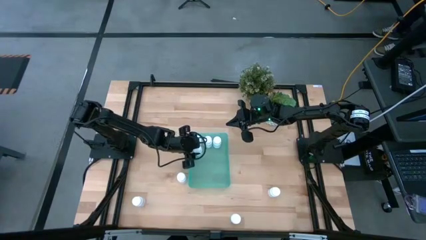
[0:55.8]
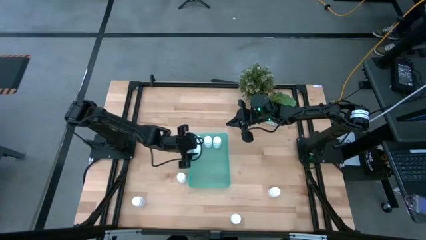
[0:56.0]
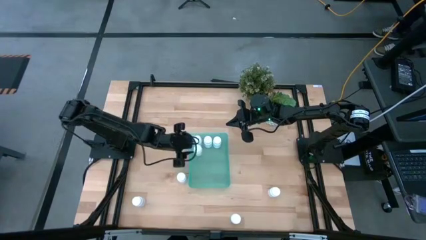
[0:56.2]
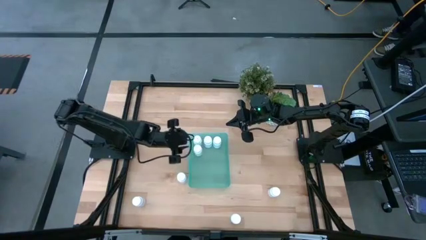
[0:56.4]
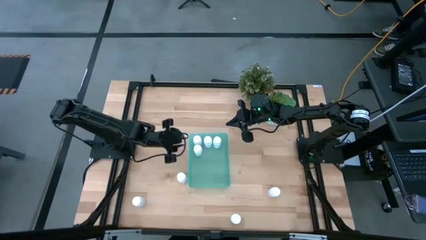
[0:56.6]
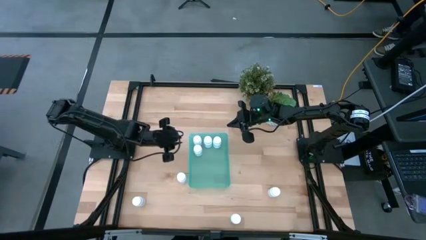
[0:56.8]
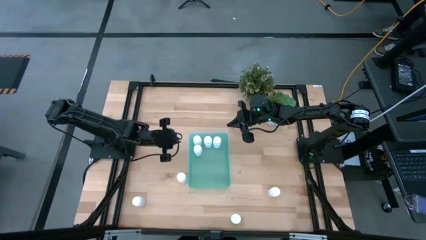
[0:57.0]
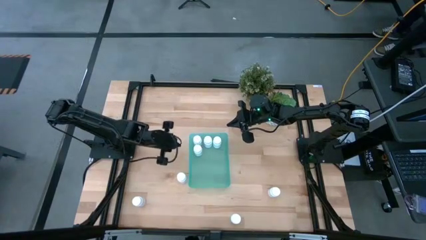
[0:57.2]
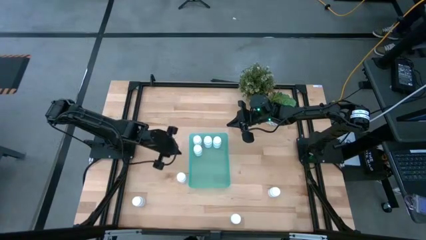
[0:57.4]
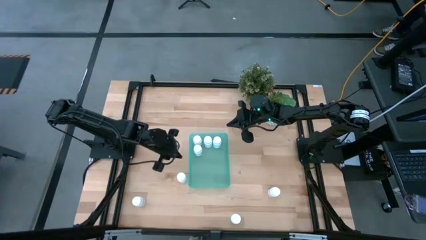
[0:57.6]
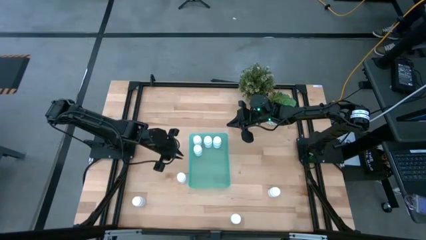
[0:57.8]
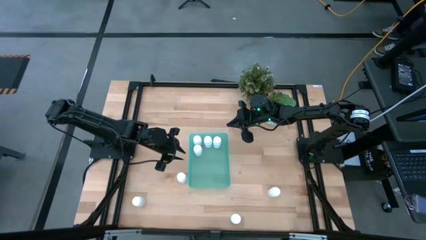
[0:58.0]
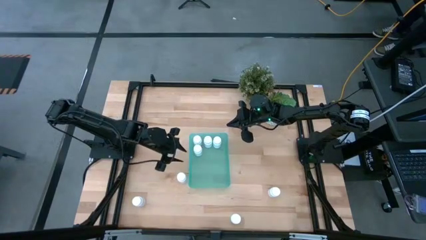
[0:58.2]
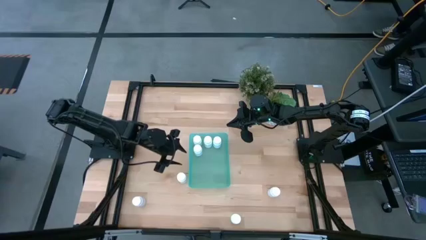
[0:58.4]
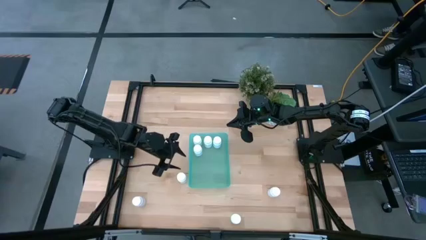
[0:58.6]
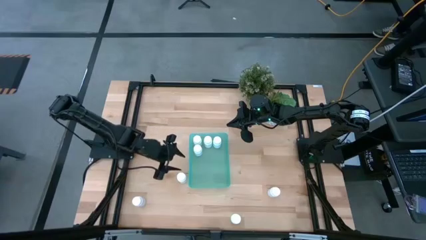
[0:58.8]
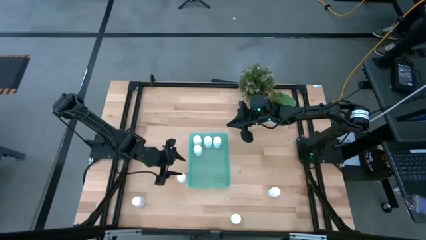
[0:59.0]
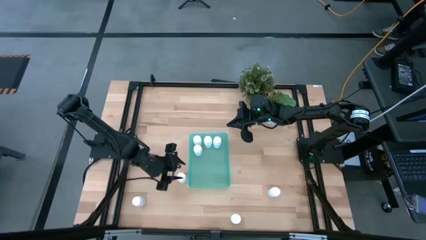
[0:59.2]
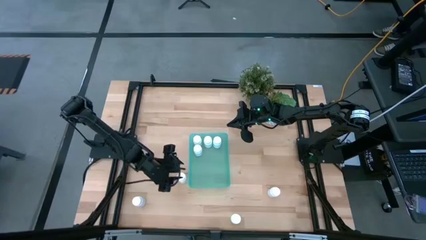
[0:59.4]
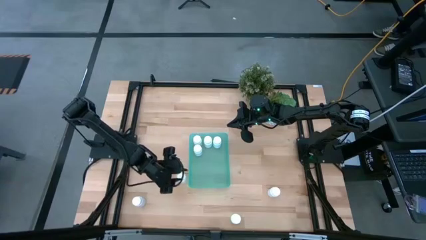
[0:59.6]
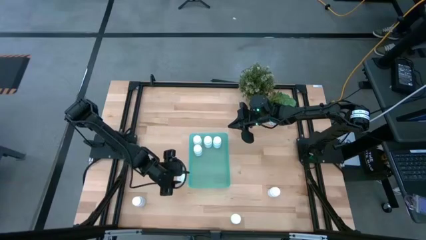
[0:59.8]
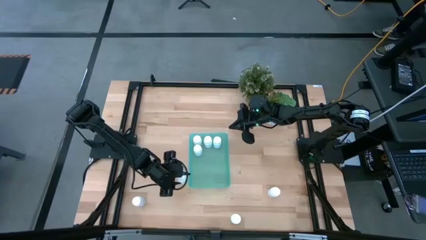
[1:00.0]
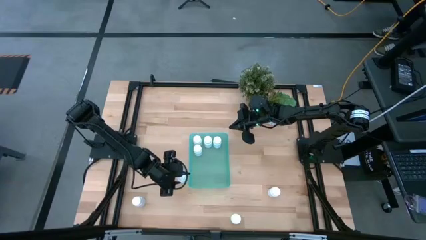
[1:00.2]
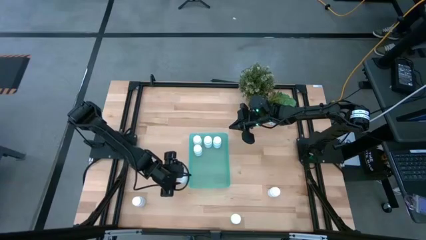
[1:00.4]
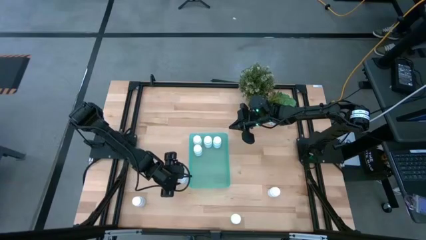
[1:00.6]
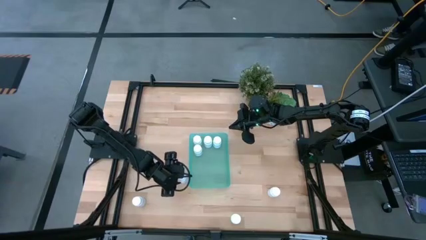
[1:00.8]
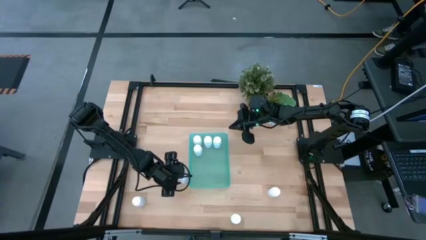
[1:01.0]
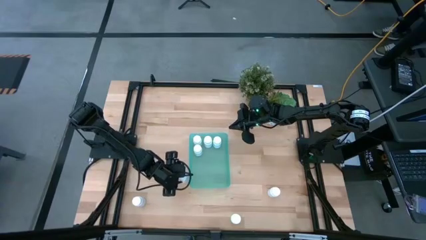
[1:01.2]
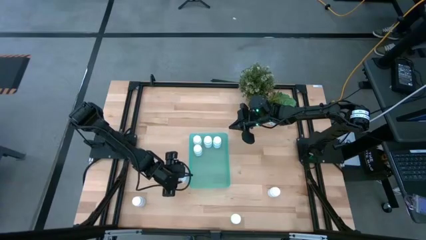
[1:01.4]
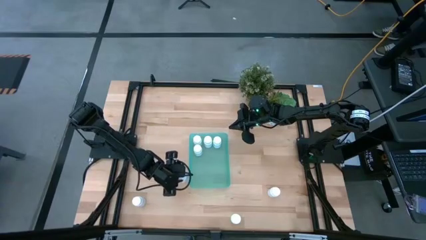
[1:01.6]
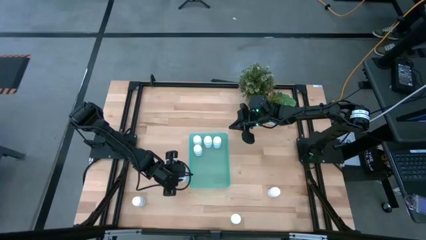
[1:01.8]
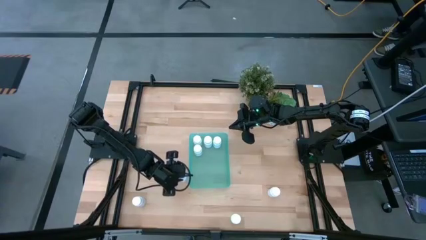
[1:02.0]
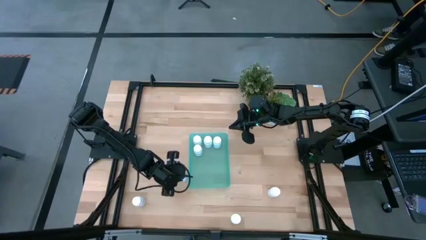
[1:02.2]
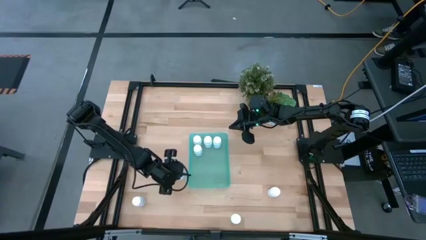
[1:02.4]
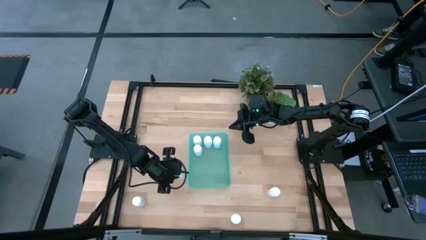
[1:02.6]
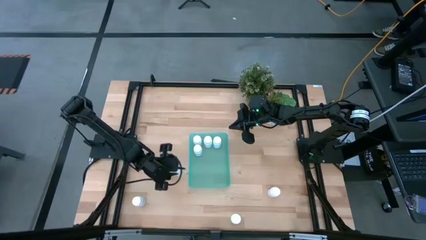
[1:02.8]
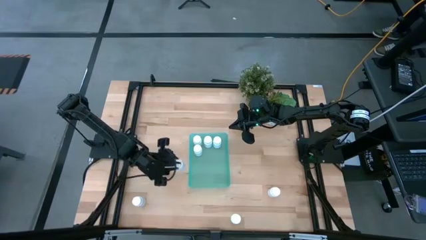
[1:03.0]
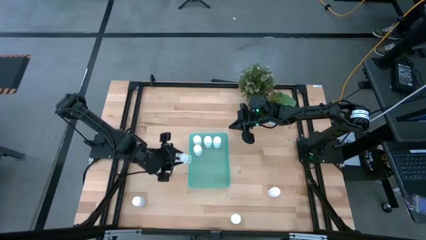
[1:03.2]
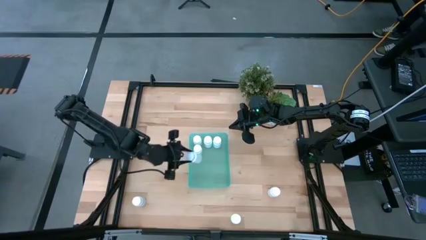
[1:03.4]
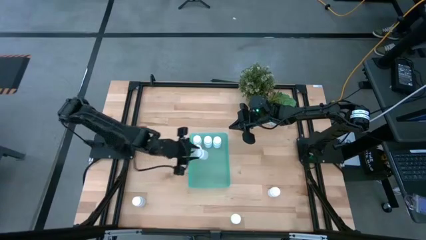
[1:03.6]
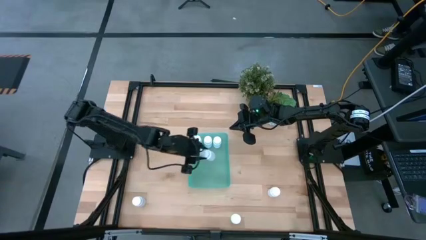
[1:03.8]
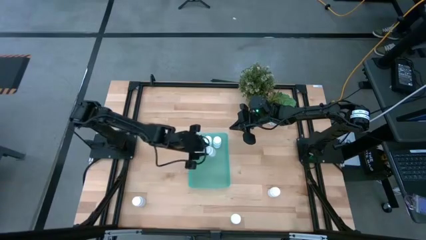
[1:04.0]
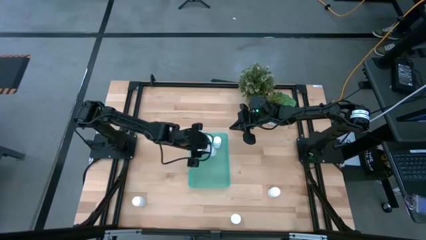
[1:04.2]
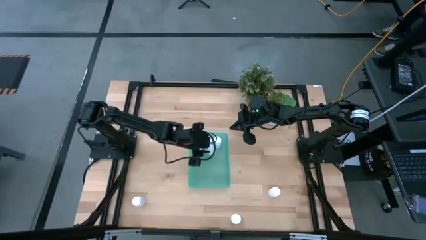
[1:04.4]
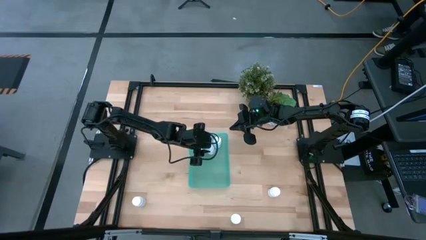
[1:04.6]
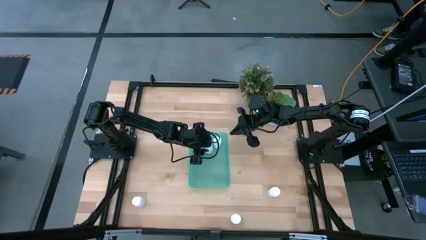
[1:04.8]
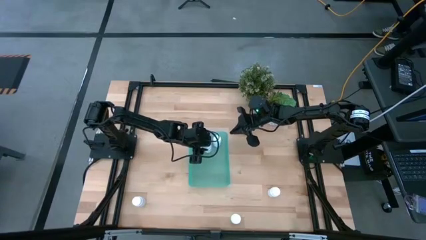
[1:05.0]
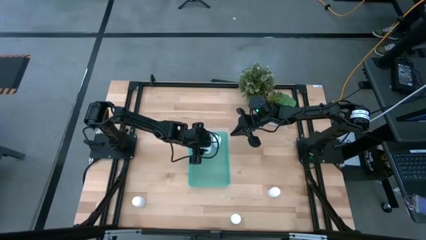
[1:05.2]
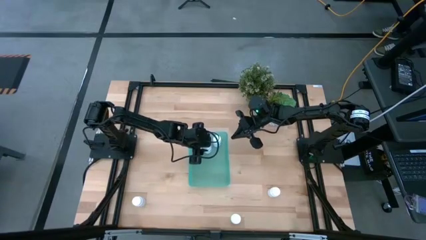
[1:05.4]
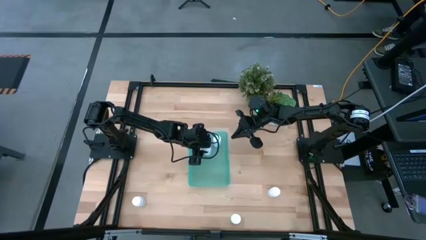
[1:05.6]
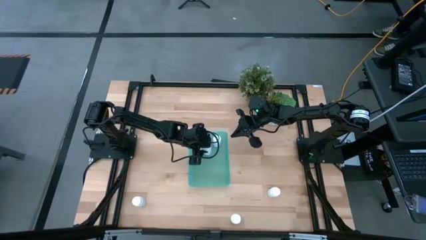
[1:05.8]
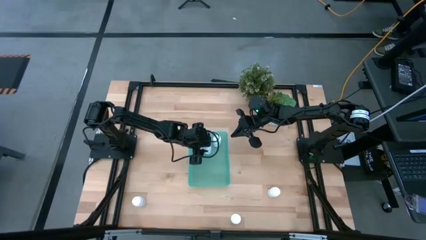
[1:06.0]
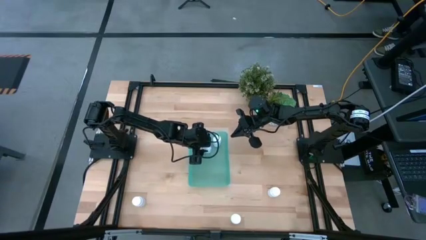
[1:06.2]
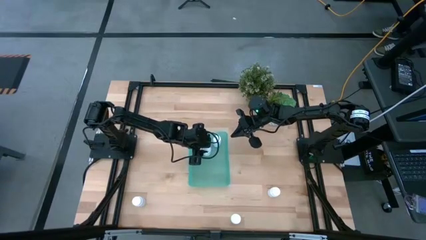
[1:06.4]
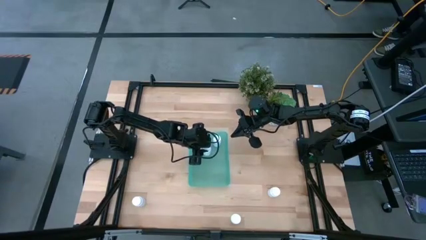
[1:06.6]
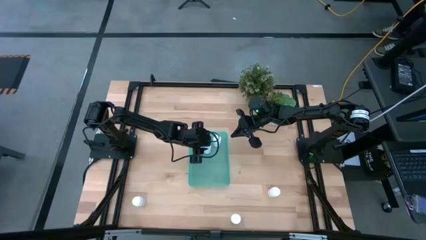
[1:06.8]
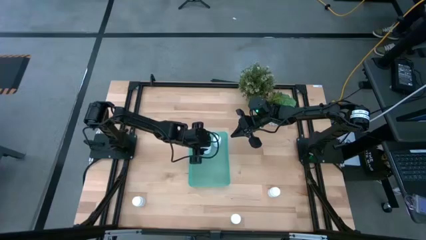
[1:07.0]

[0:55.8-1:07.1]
Task: Pick and place pill bottles into a basket
Put the white pill bottle into the green bin

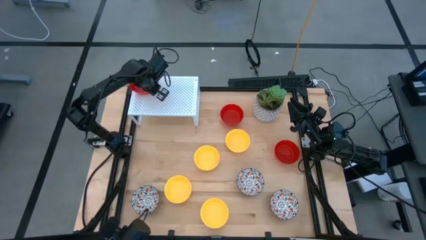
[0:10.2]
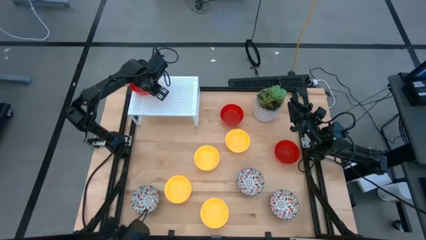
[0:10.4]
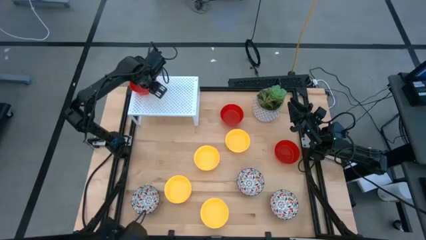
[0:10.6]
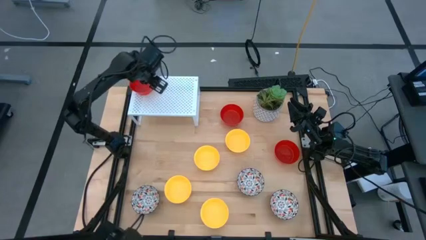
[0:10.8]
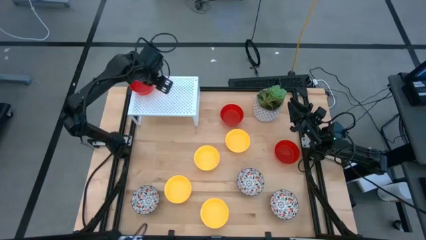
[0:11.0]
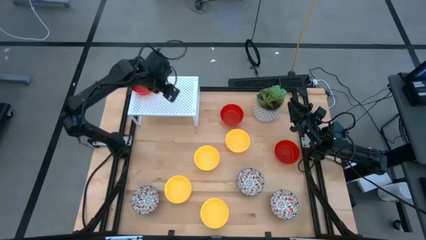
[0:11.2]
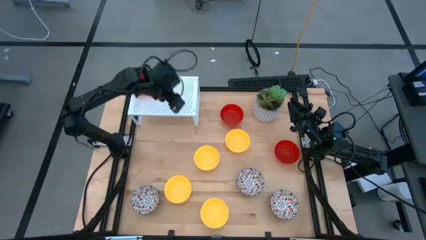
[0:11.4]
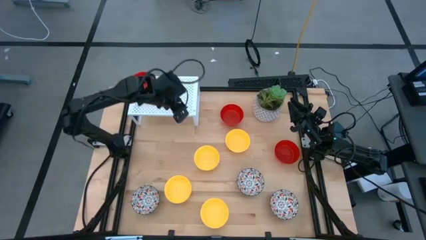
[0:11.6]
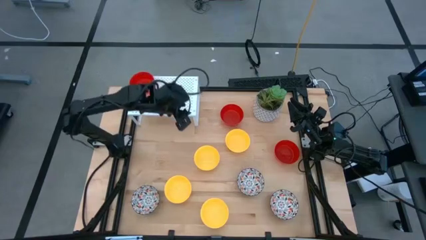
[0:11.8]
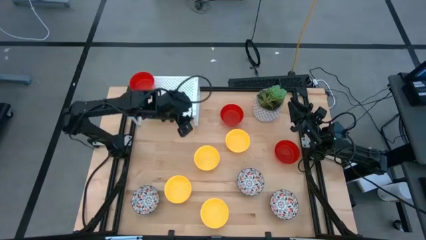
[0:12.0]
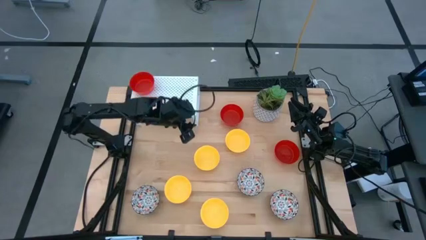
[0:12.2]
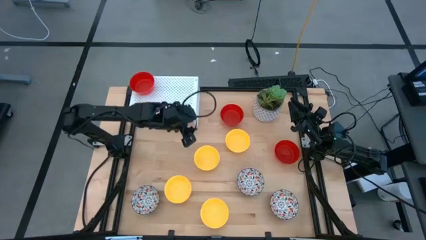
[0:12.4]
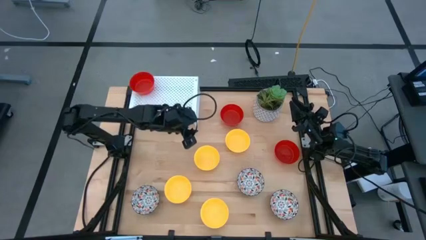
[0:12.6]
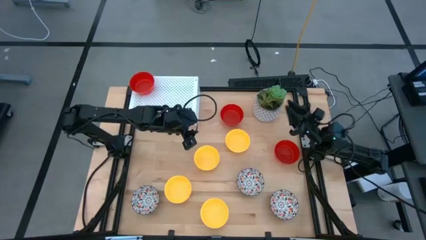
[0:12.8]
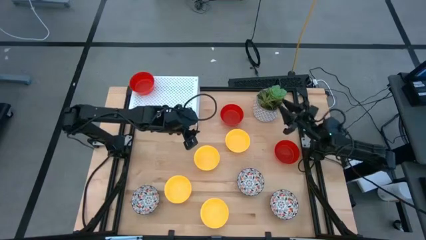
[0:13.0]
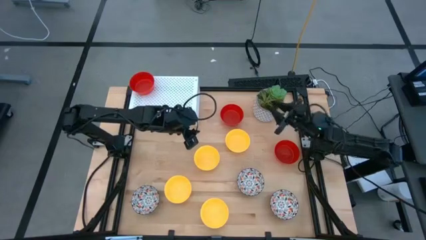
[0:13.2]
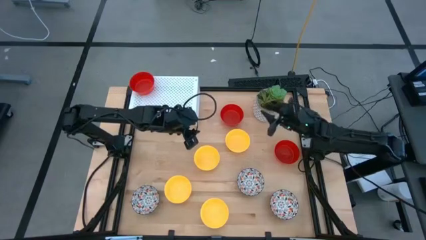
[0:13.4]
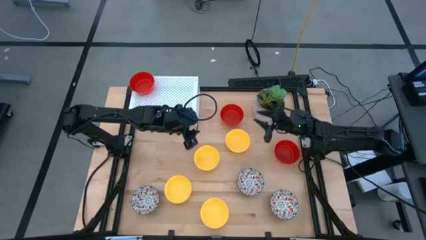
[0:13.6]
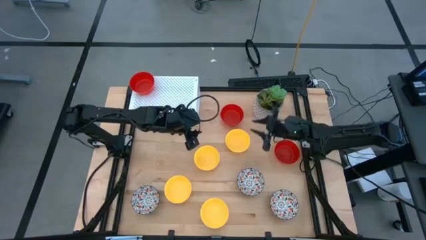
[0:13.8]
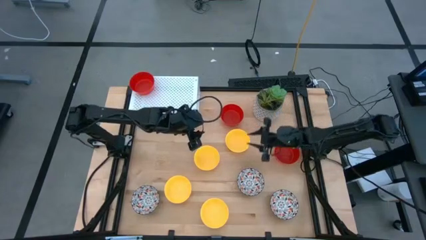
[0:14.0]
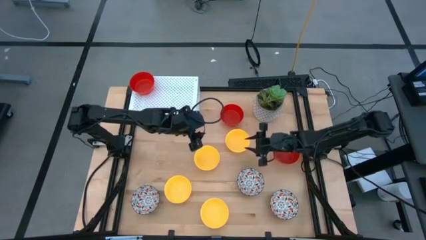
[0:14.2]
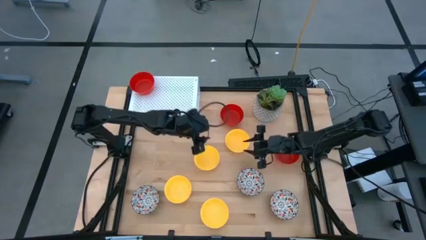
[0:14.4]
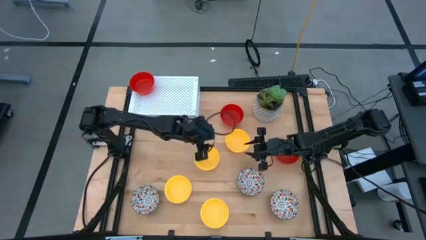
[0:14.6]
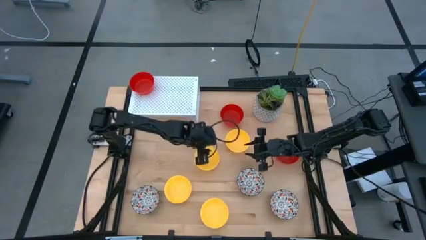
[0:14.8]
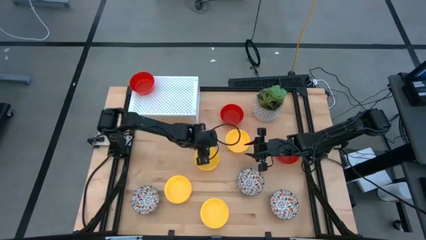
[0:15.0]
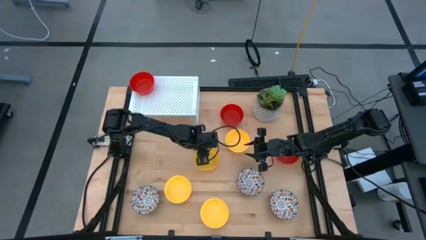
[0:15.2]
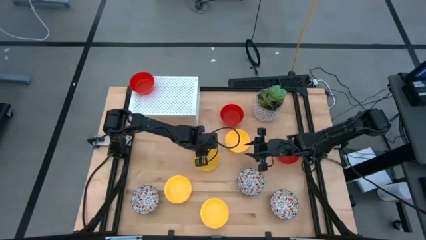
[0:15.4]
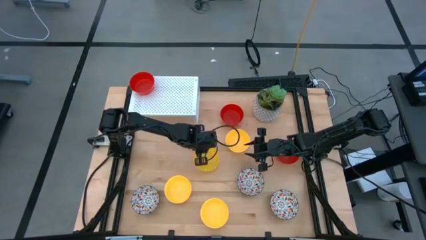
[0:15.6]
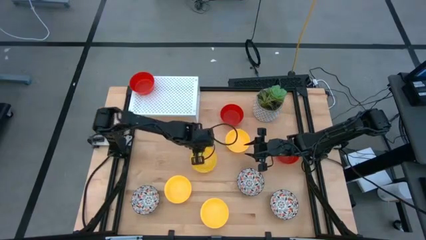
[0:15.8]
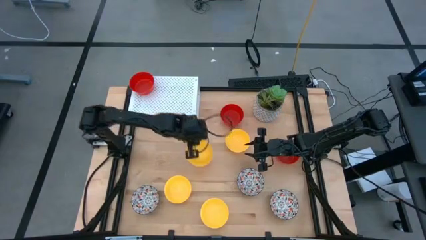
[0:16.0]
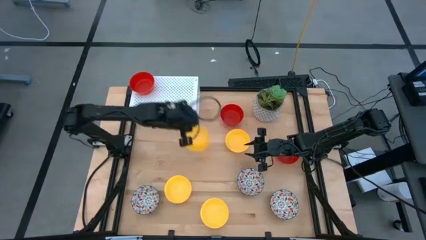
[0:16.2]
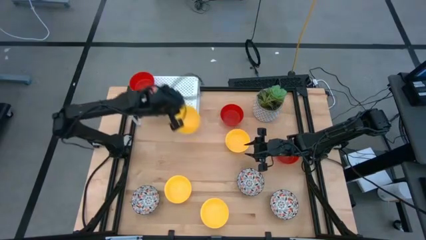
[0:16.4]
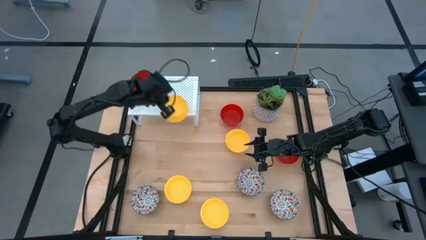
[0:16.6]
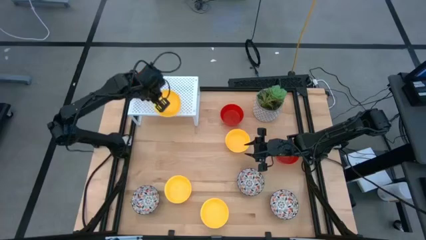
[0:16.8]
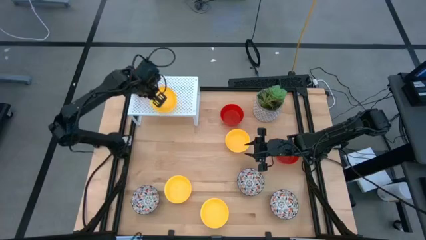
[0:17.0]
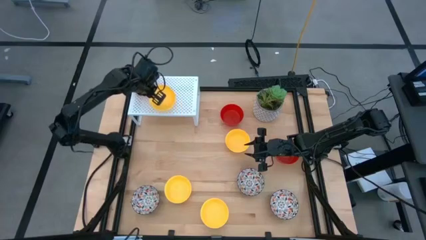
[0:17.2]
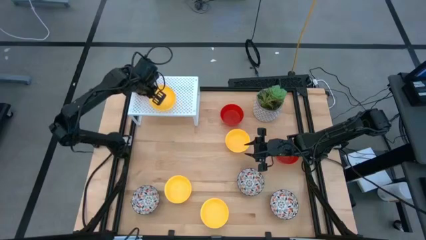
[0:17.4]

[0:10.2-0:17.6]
Task: Pick & Place Mini bowls
Put the yellow bowl on the shelf
